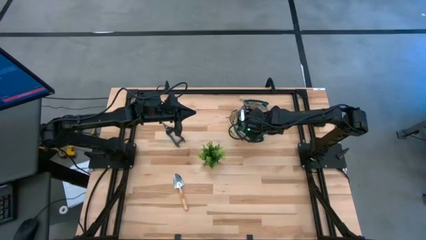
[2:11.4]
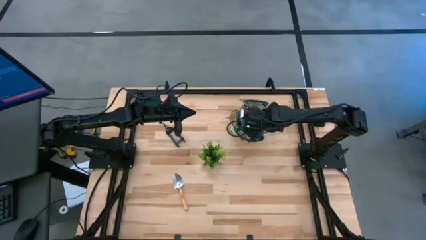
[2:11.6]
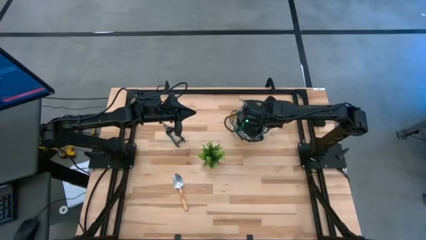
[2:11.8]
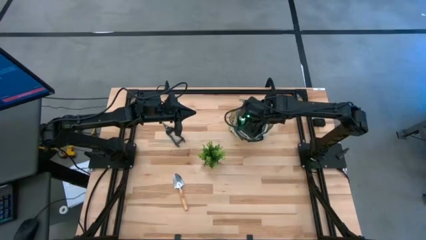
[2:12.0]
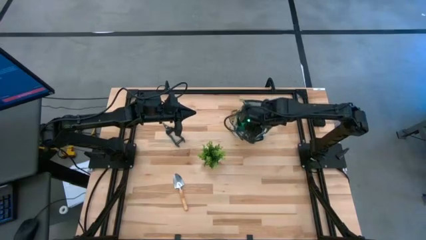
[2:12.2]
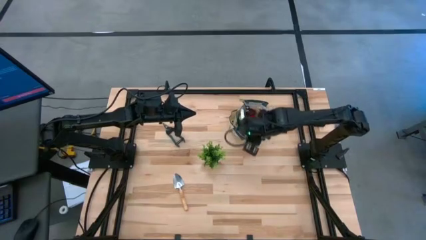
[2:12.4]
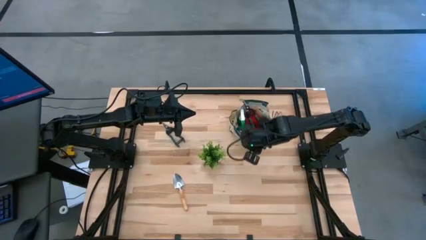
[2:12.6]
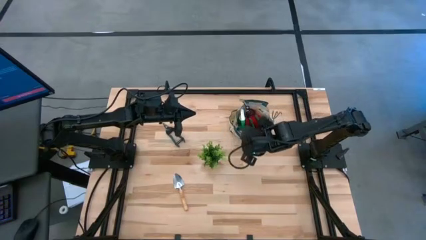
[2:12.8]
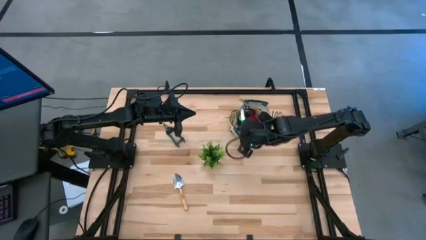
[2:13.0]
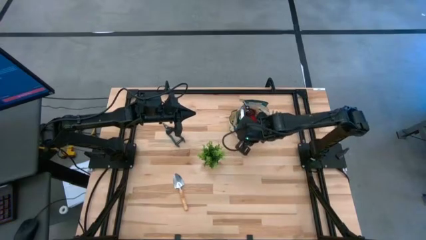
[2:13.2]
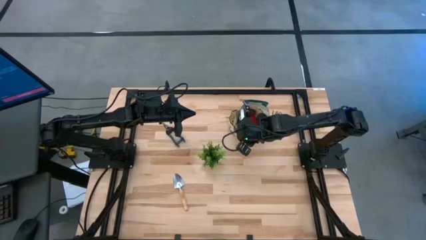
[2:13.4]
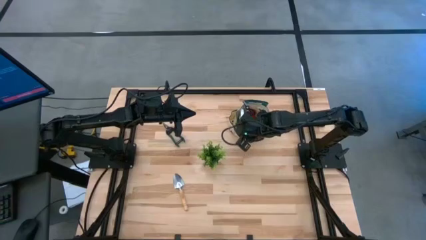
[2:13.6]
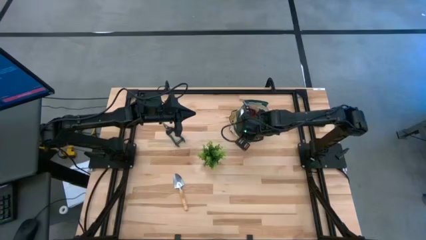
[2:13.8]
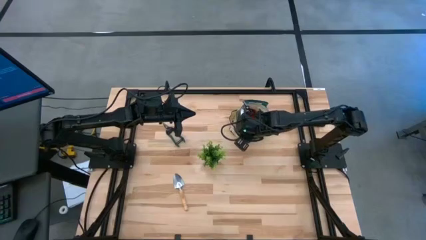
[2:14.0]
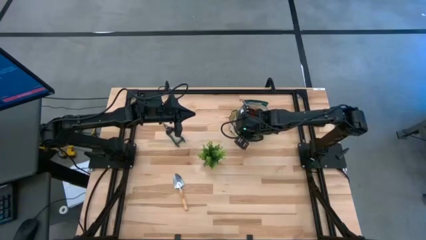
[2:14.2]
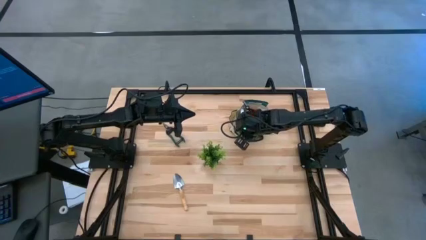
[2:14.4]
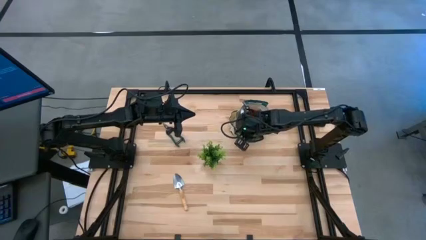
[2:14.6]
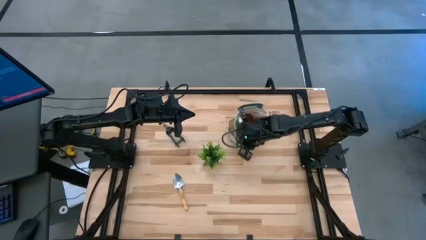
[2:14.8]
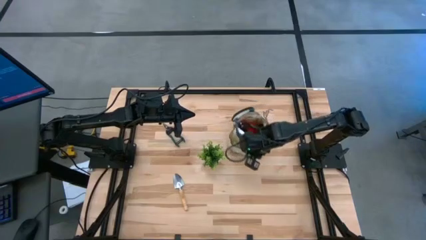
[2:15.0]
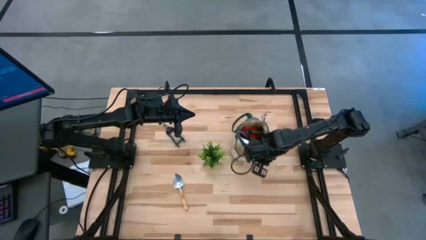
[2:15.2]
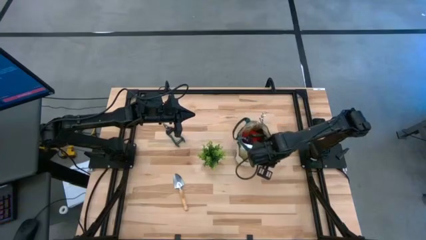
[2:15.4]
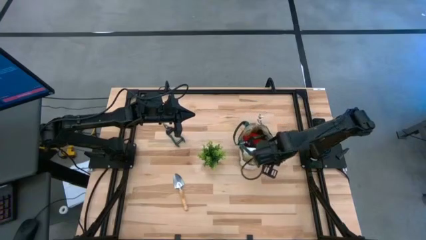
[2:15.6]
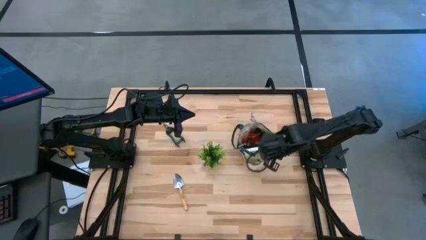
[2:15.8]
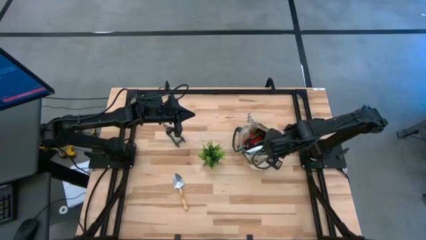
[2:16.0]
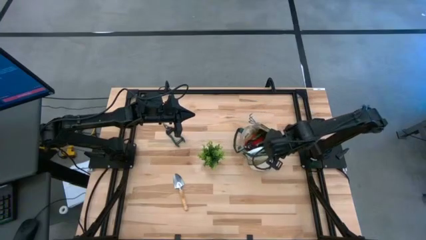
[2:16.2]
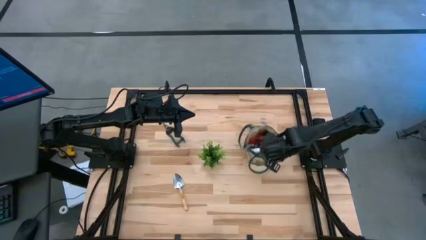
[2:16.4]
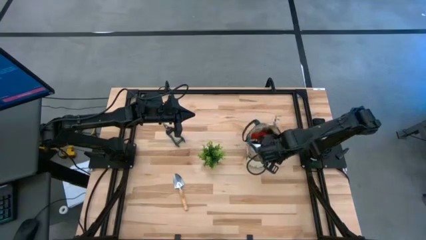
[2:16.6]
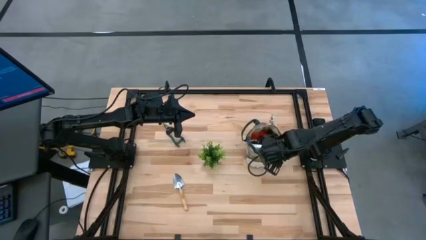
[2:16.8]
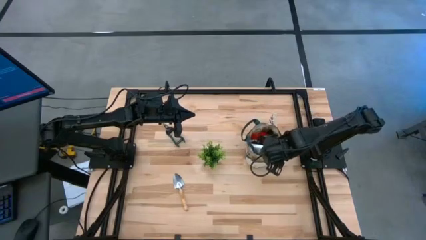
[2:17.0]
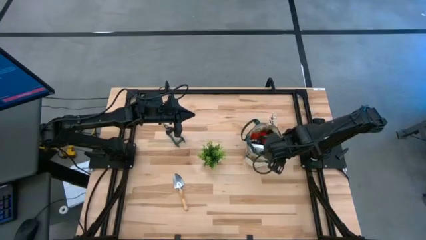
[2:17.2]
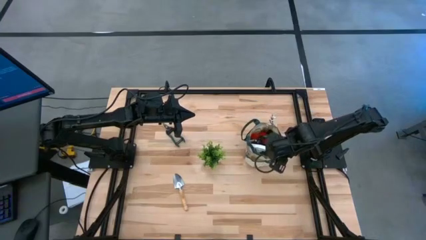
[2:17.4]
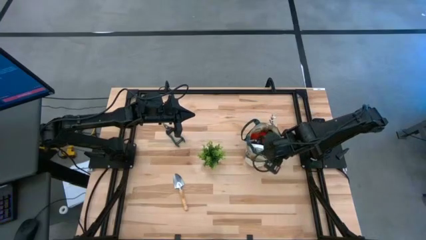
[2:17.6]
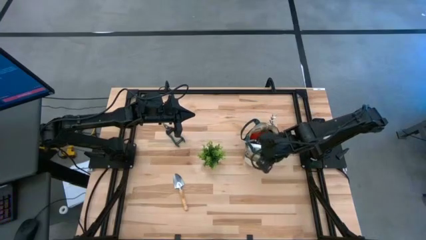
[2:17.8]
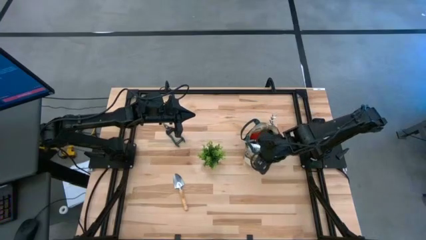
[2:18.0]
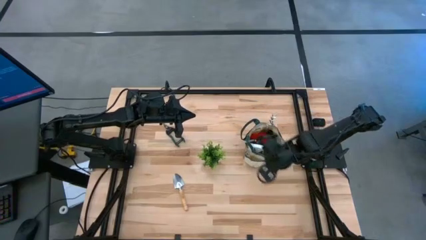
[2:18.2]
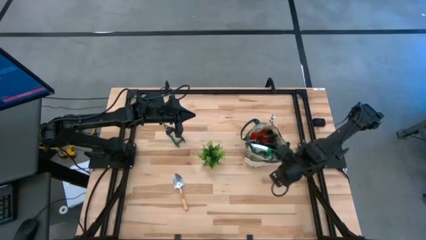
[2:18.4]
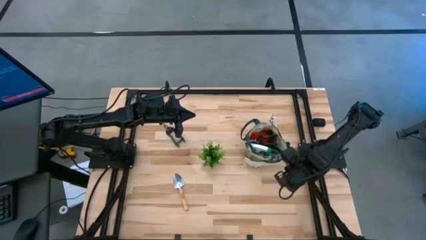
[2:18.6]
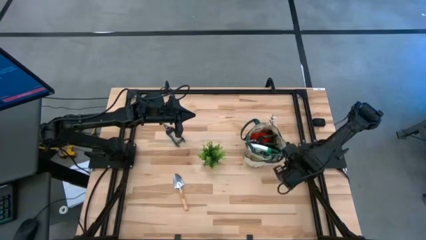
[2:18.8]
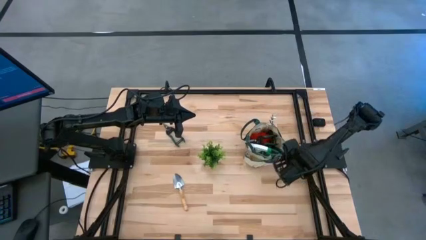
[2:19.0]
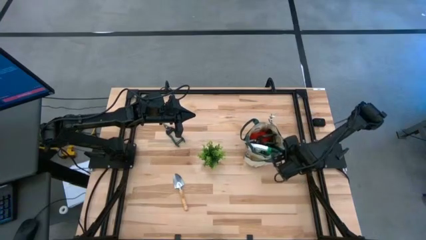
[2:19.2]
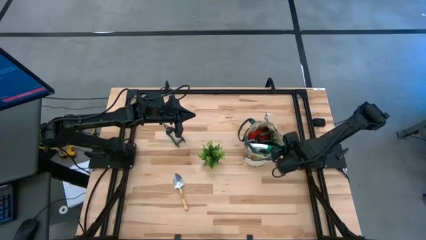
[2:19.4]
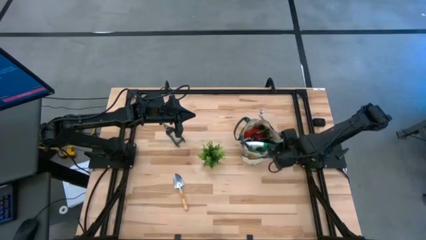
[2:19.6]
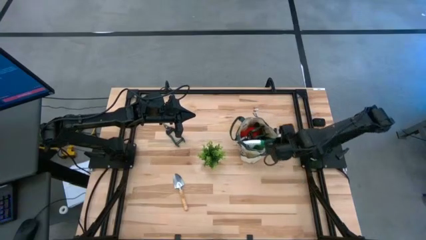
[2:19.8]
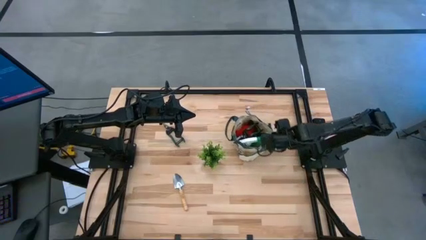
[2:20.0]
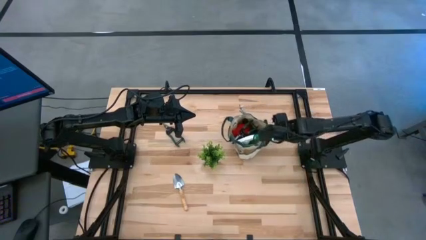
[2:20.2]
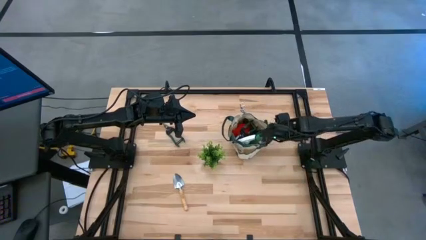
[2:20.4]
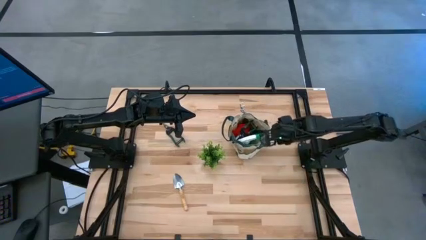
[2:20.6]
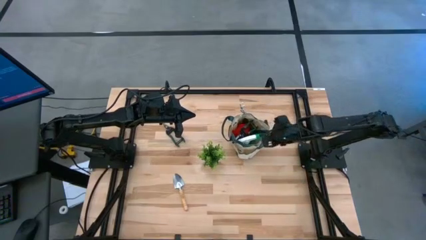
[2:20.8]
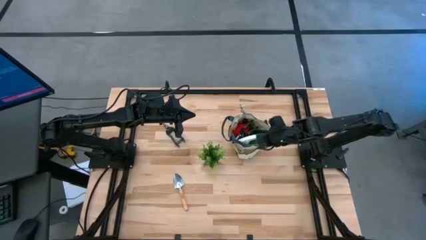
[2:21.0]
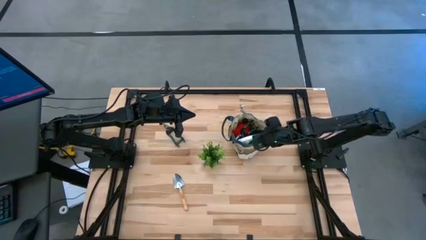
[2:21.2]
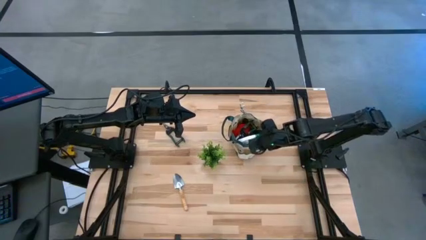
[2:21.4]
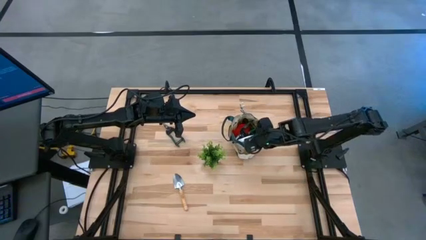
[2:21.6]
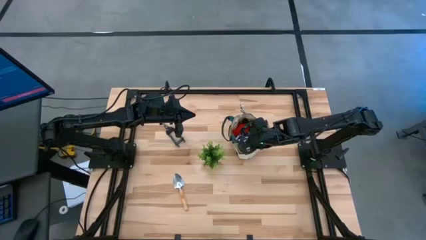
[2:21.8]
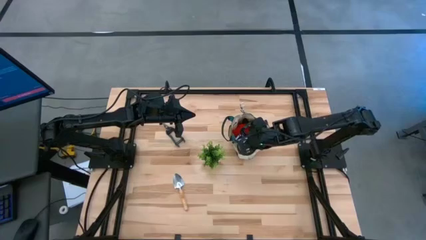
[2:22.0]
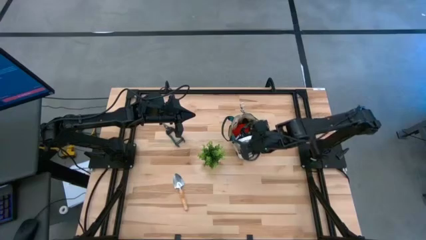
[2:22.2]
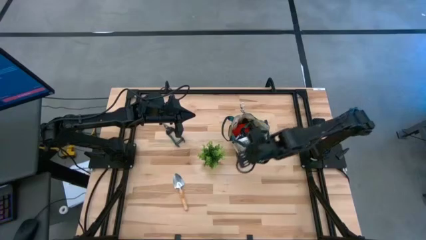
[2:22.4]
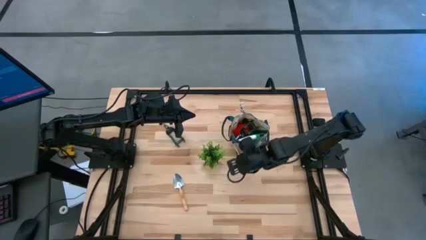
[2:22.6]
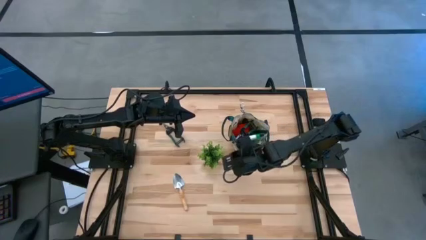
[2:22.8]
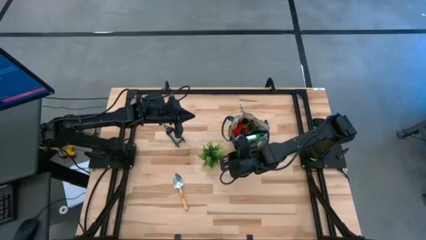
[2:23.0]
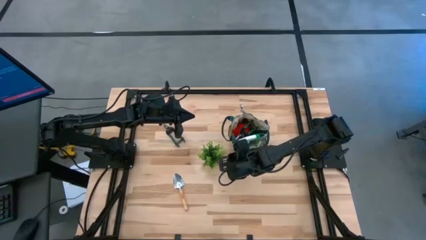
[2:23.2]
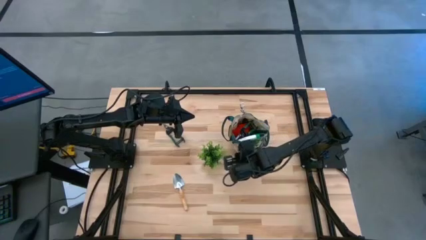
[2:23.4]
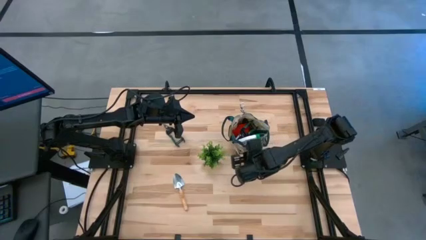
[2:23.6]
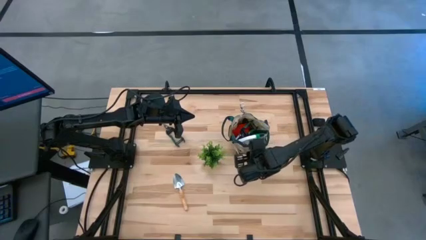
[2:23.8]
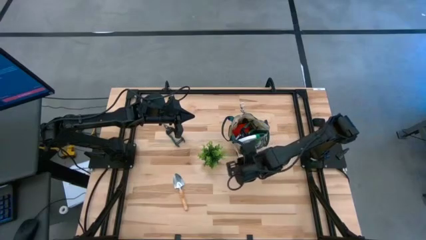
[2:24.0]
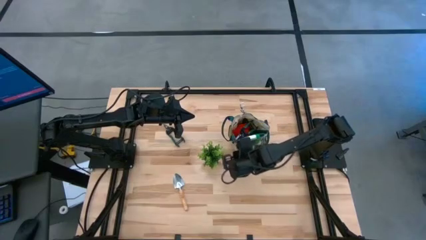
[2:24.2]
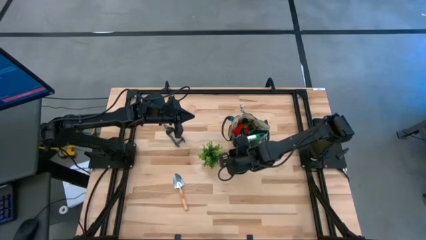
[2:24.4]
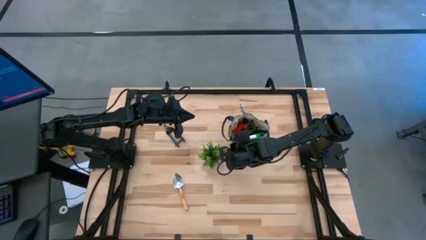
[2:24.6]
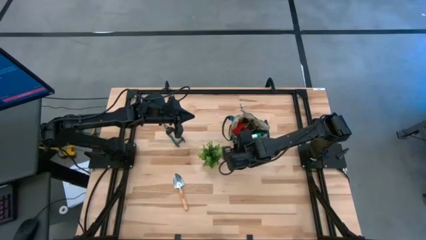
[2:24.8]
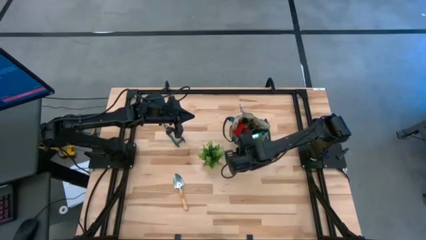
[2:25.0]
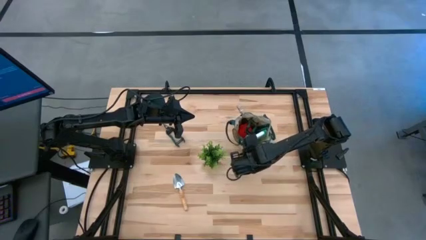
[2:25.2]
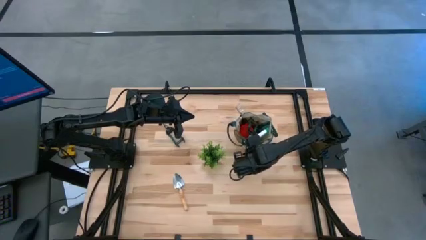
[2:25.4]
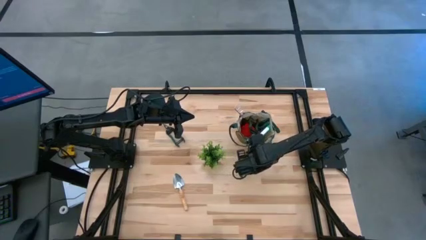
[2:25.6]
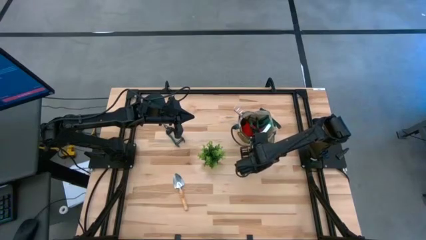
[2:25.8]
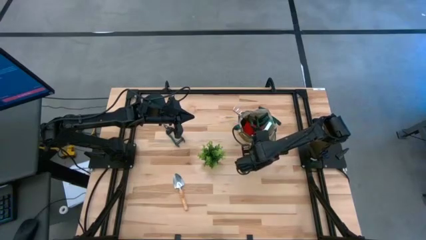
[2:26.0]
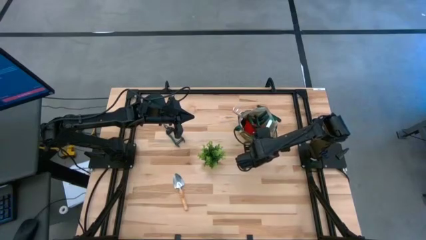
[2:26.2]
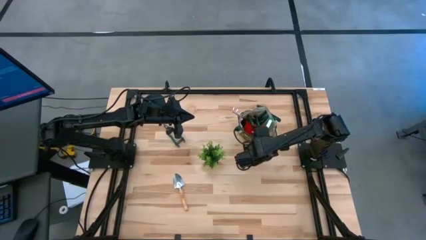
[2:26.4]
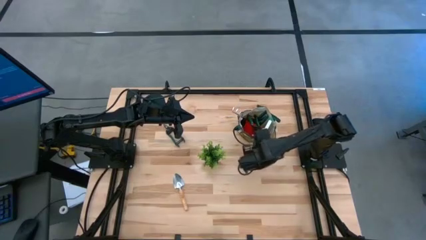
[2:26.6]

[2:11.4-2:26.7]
Task: Pick & Place Garden tools in Gardening bag
Adjust the brown gardening bag
